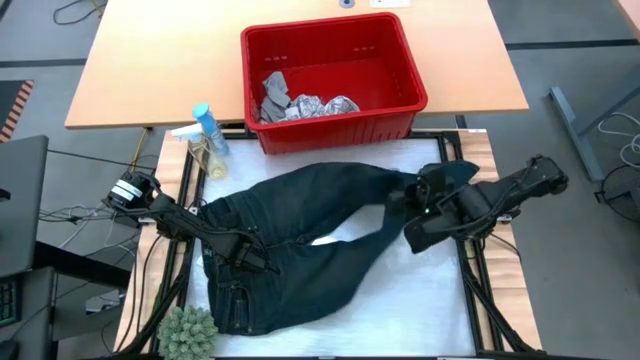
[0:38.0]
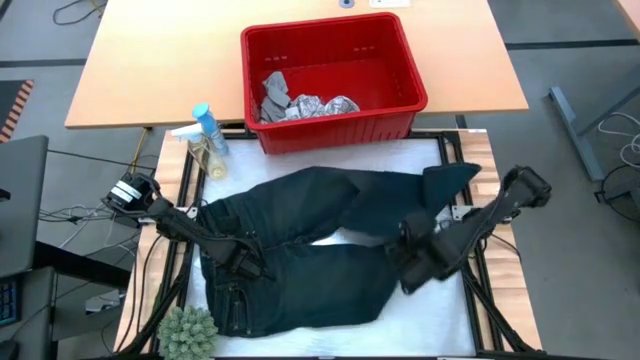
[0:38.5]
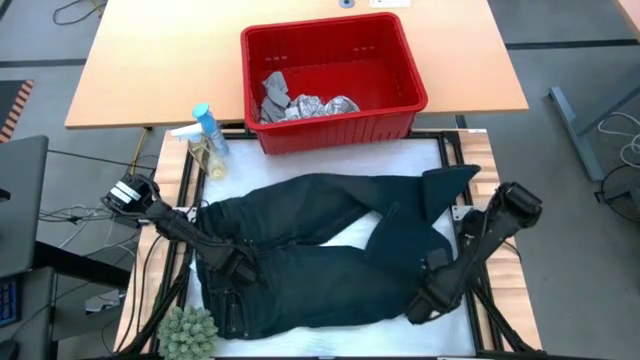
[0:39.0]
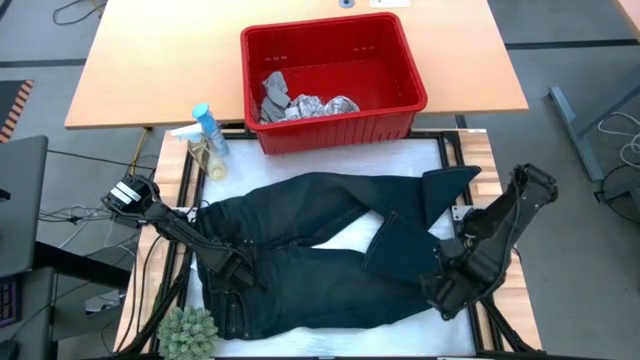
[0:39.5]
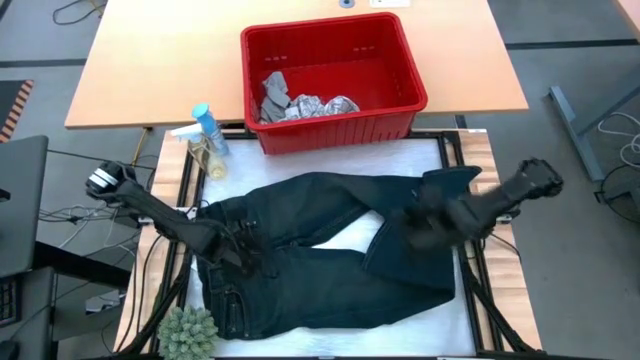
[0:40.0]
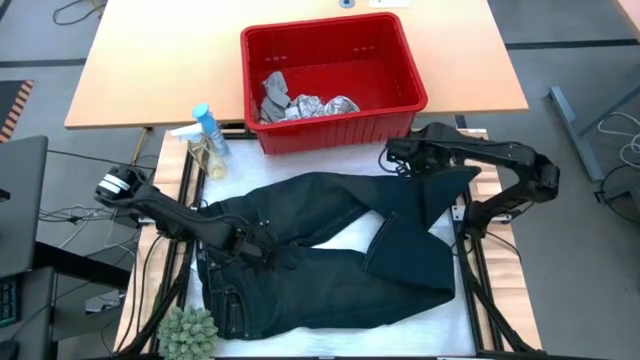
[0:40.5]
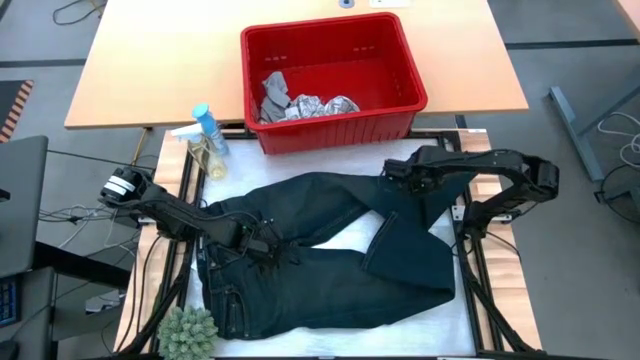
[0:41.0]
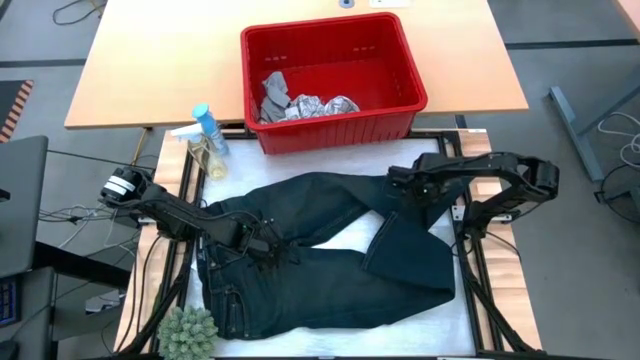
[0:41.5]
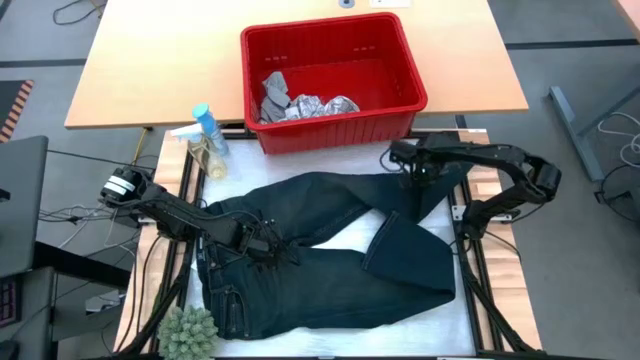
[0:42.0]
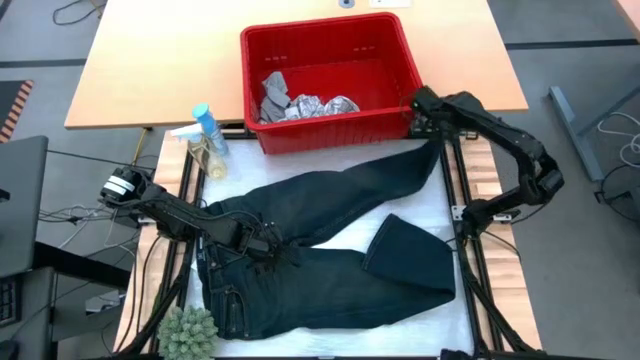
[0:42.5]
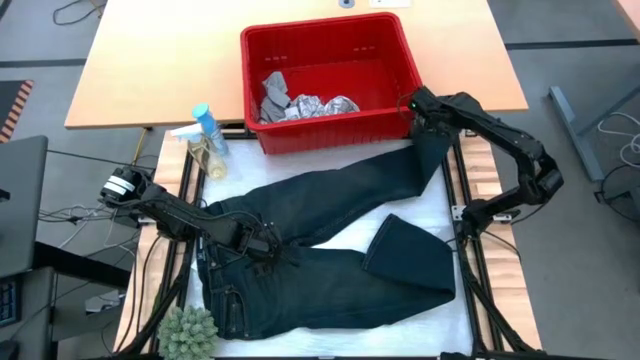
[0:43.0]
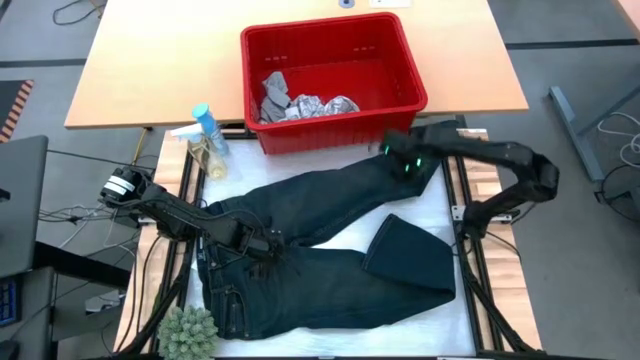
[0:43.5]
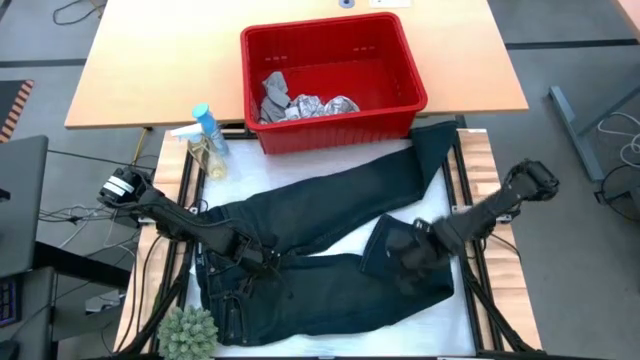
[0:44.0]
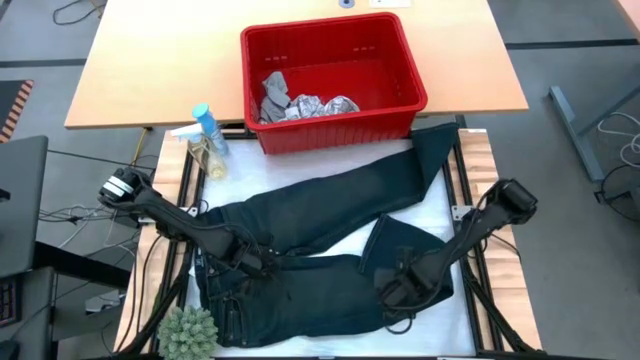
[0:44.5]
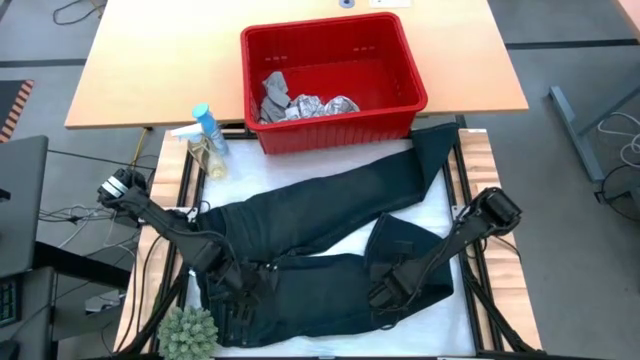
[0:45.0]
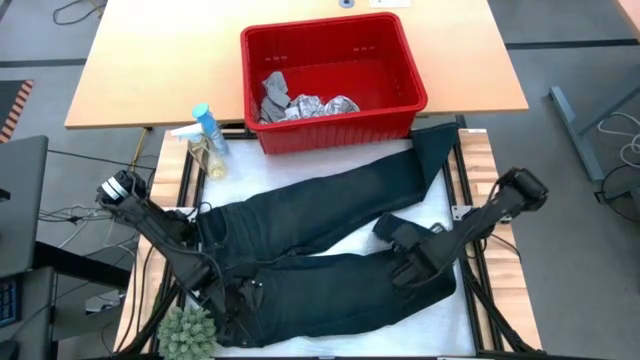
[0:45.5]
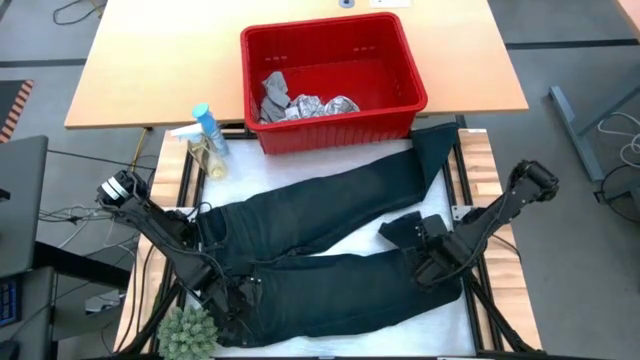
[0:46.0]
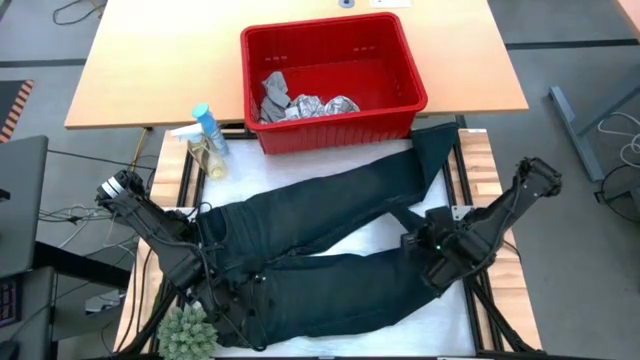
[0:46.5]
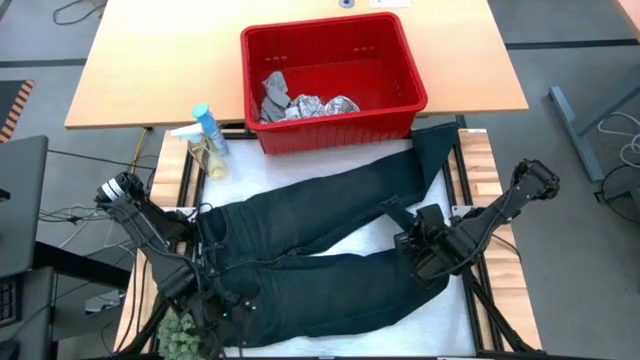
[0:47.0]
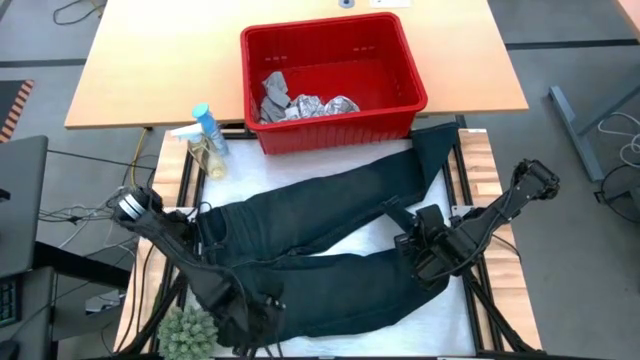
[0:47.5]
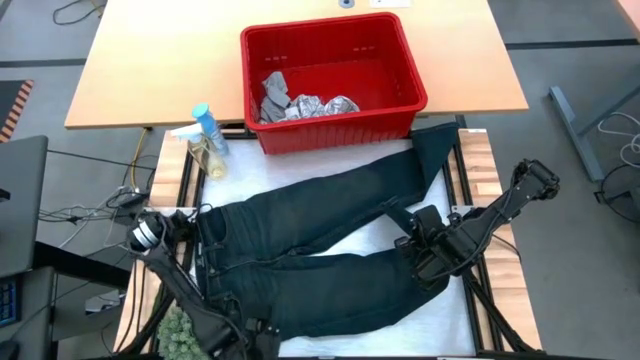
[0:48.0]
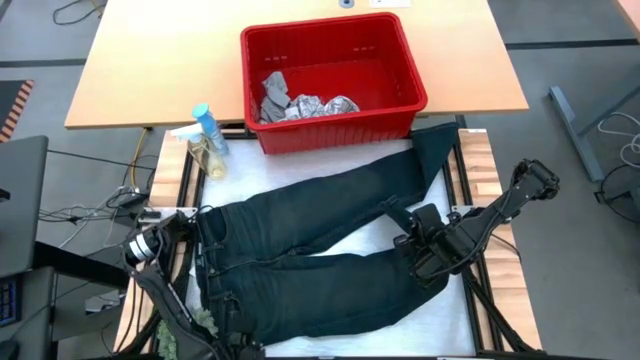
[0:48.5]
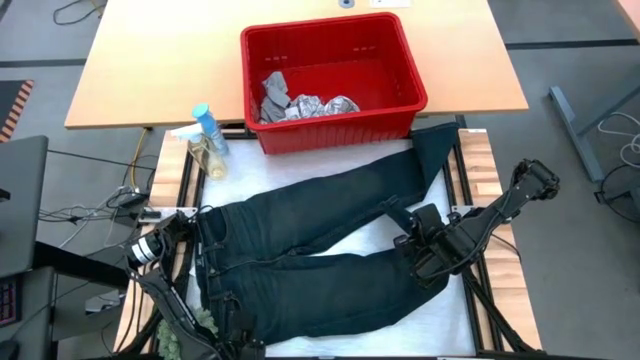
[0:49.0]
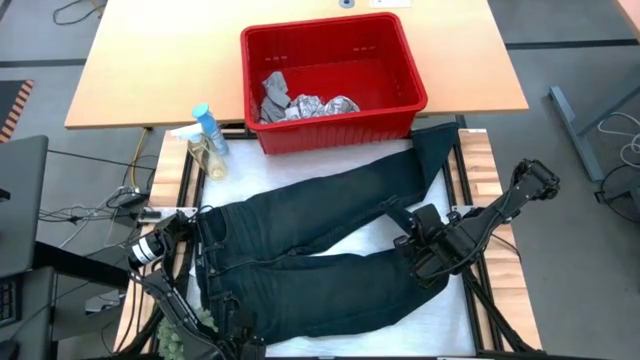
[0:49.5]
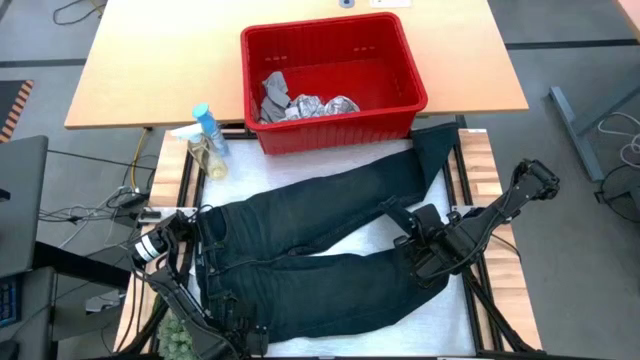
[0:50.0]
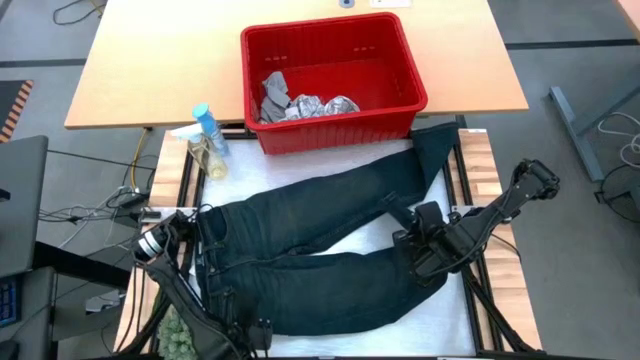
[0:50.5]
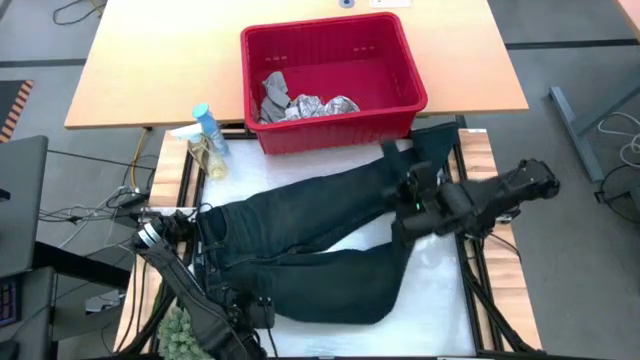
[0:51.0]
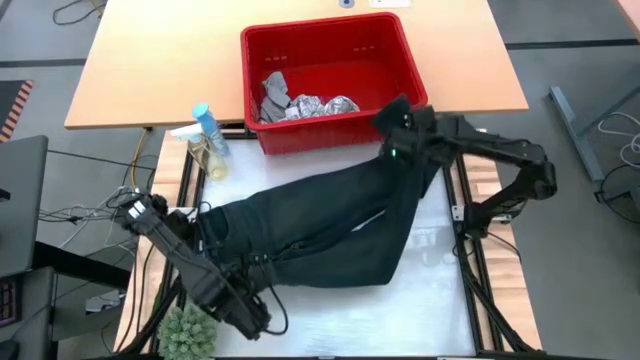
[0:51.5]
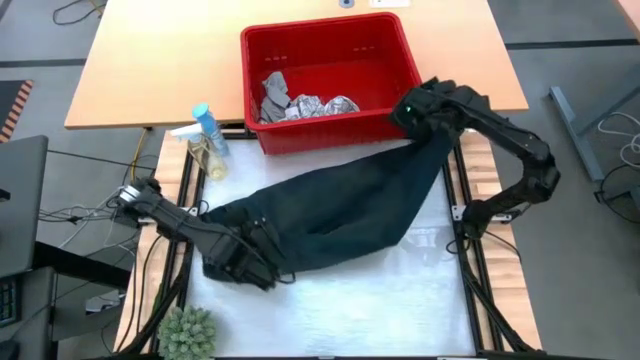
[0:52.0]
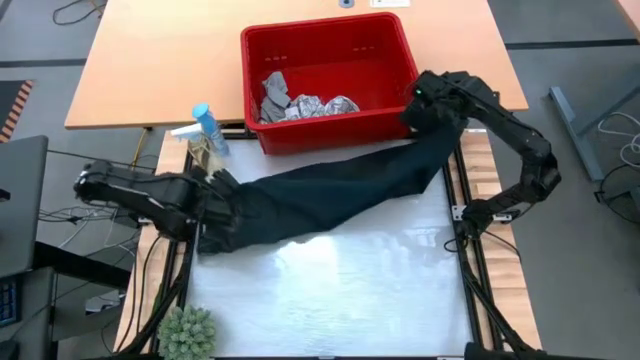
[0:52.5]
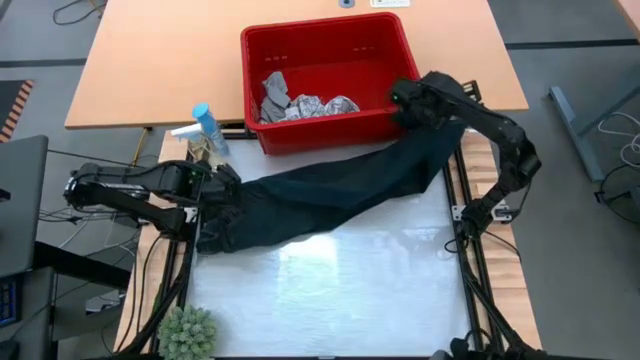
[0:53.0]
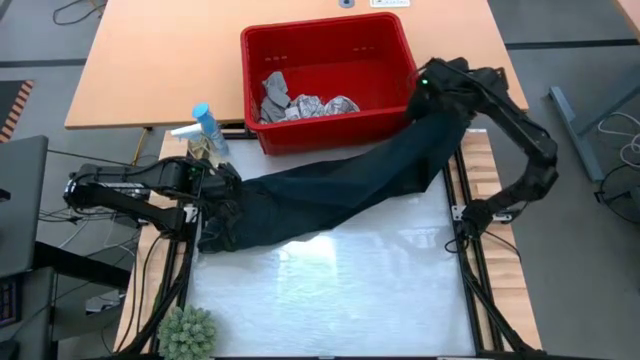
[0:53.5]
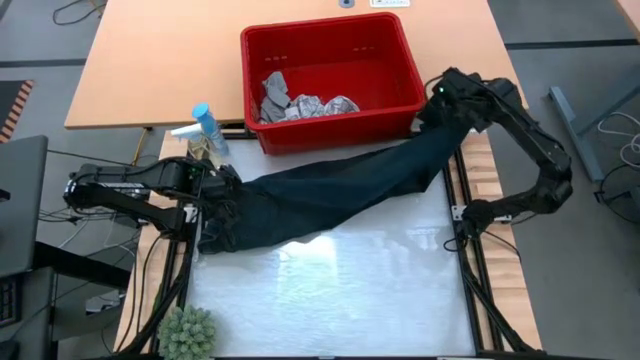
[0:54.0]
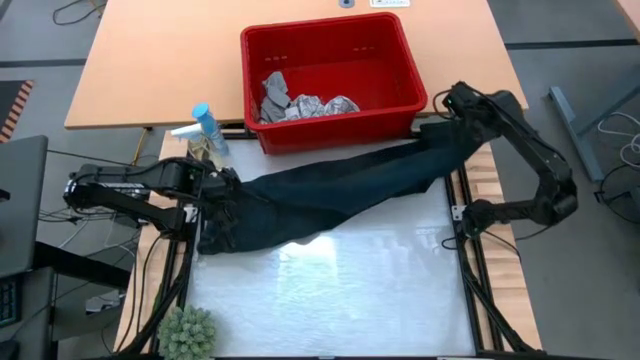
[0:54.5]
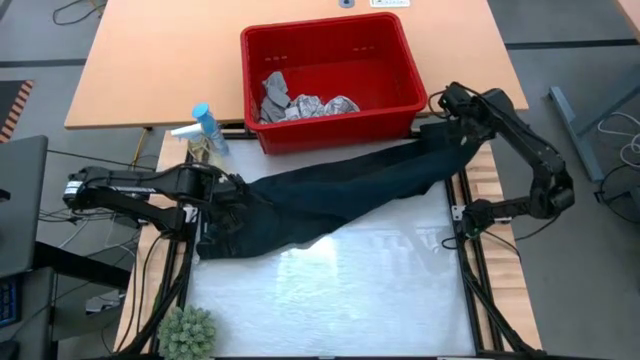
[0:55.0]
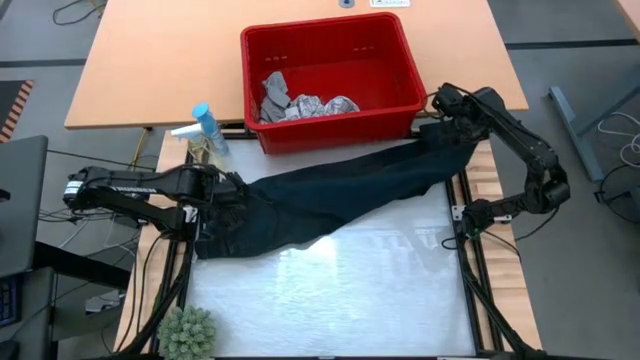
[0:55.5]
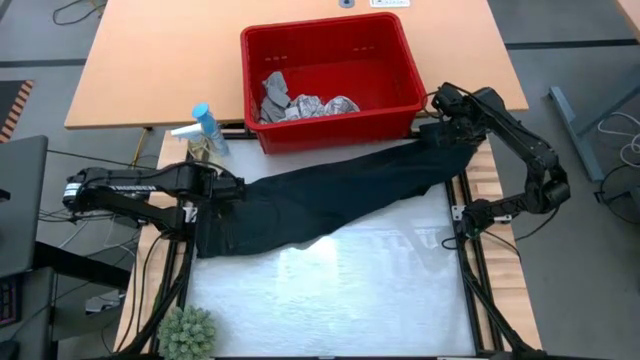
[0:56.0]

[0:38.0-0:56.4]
Task: Fold Laundry from Bin
Fold the blue jeans
